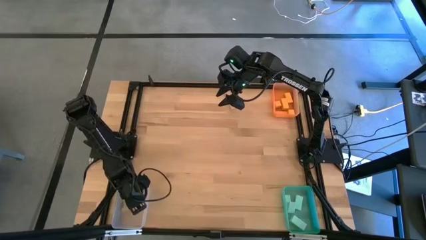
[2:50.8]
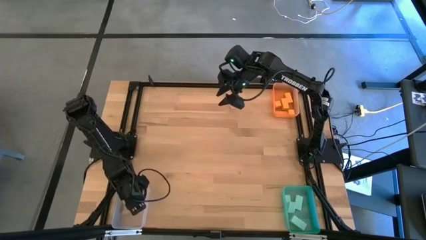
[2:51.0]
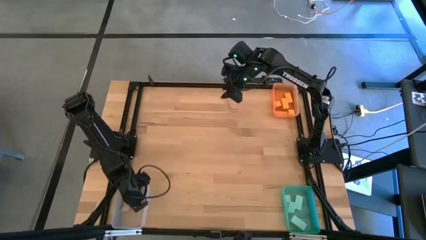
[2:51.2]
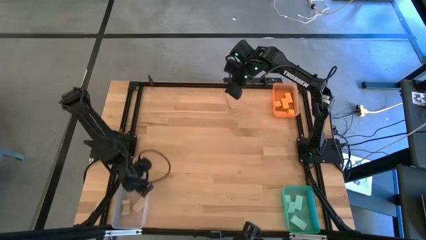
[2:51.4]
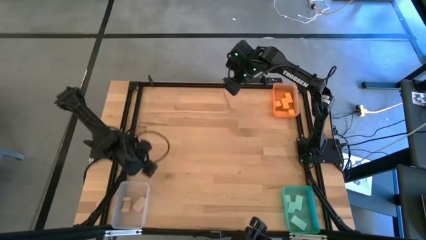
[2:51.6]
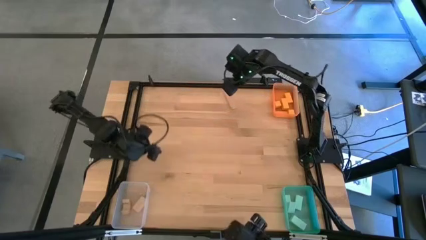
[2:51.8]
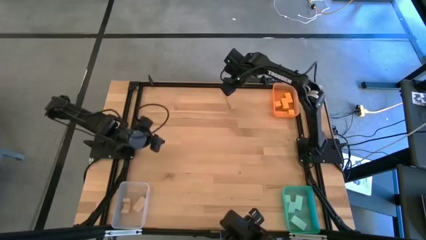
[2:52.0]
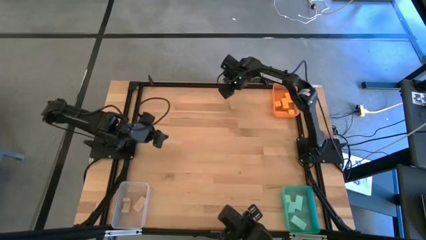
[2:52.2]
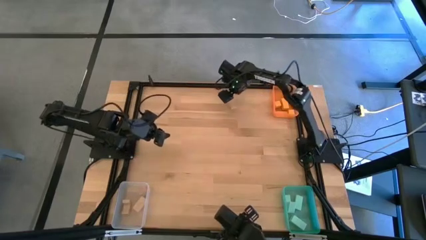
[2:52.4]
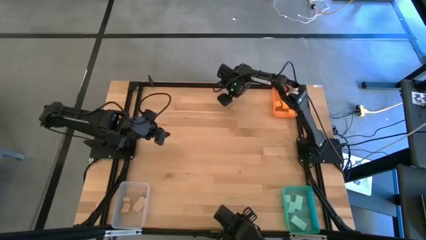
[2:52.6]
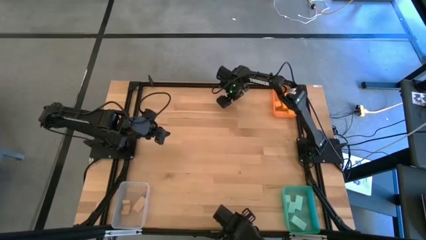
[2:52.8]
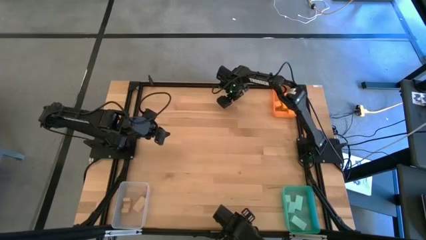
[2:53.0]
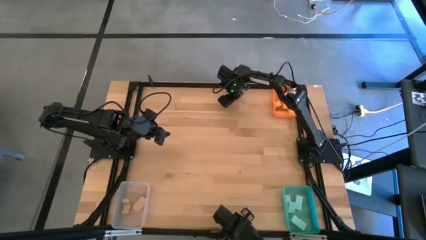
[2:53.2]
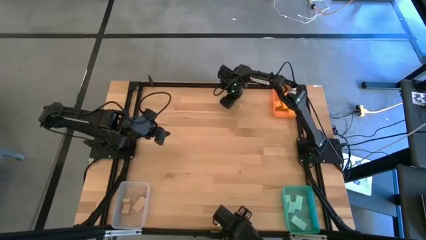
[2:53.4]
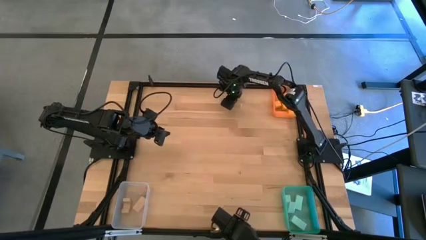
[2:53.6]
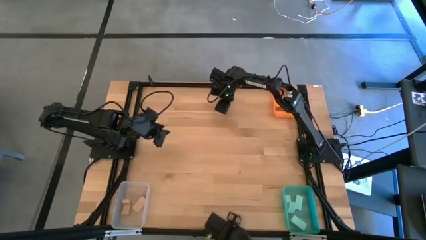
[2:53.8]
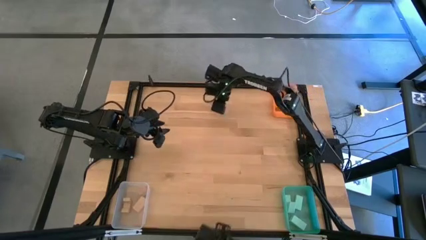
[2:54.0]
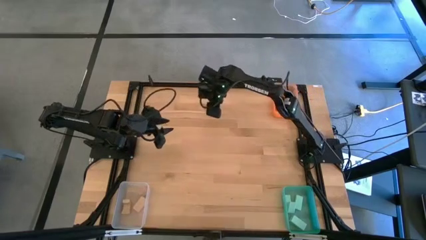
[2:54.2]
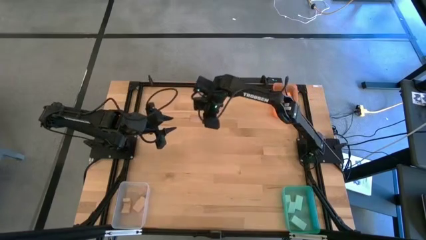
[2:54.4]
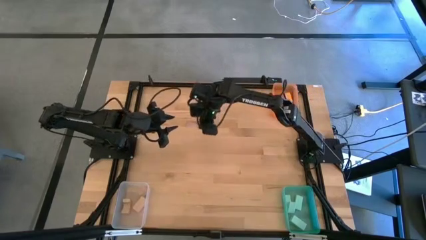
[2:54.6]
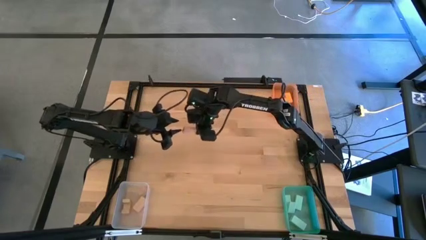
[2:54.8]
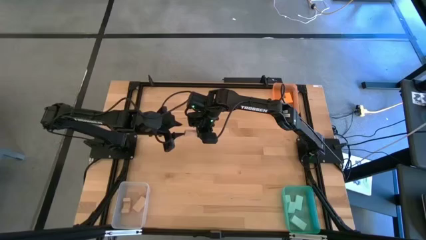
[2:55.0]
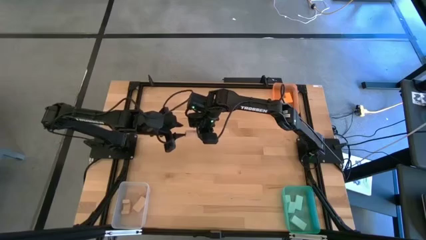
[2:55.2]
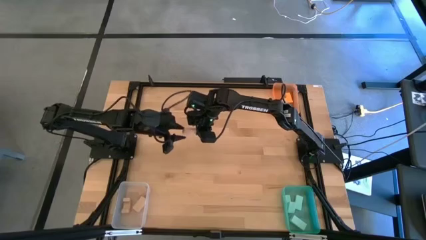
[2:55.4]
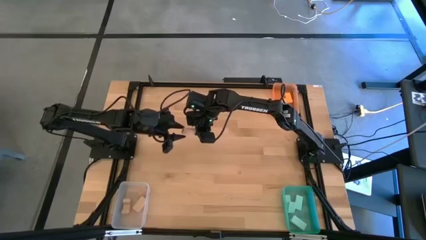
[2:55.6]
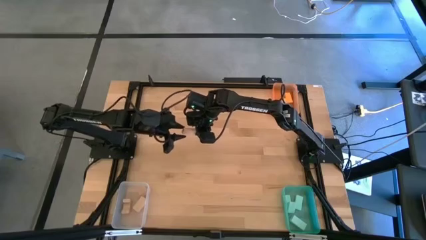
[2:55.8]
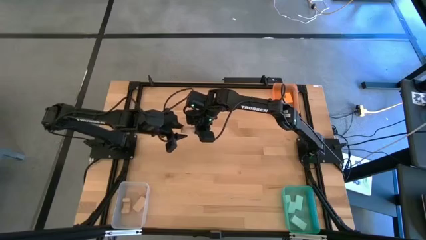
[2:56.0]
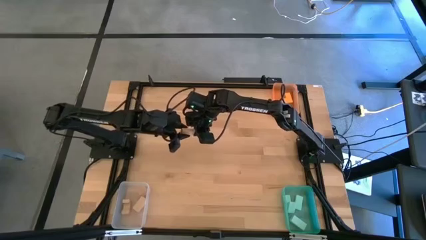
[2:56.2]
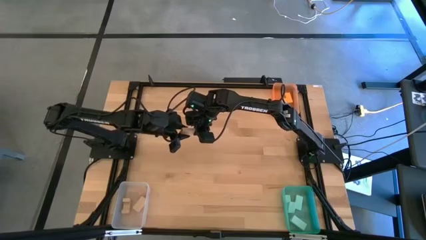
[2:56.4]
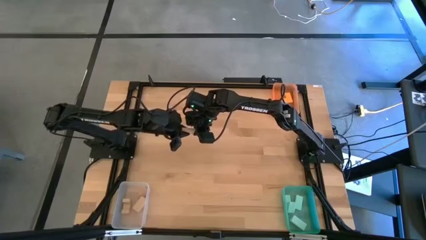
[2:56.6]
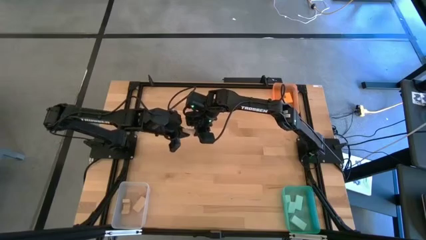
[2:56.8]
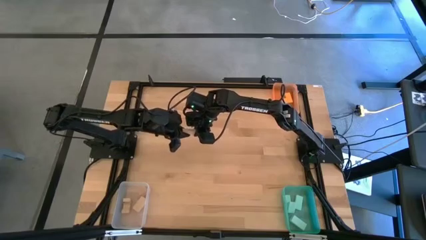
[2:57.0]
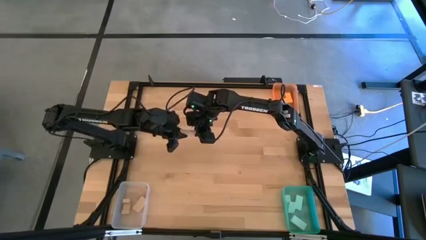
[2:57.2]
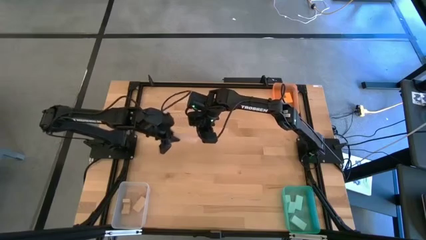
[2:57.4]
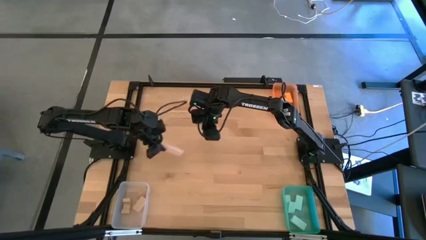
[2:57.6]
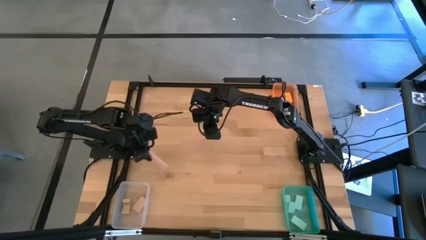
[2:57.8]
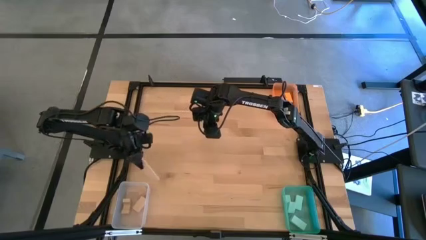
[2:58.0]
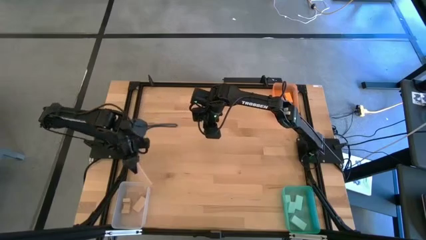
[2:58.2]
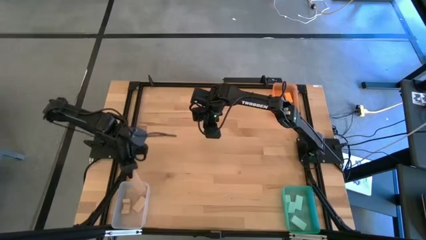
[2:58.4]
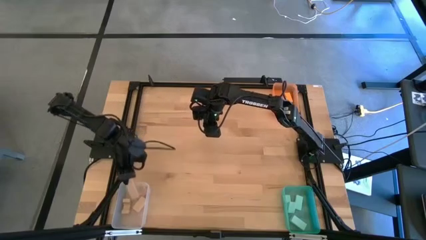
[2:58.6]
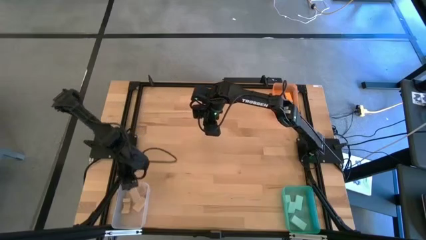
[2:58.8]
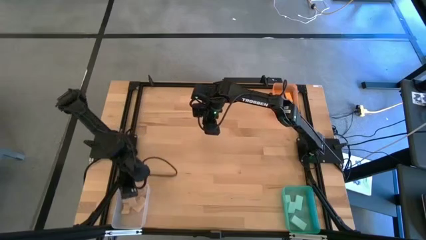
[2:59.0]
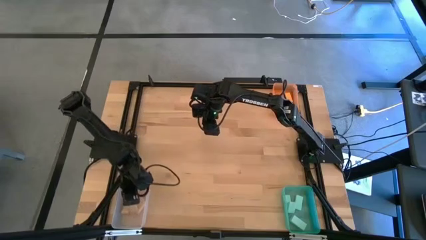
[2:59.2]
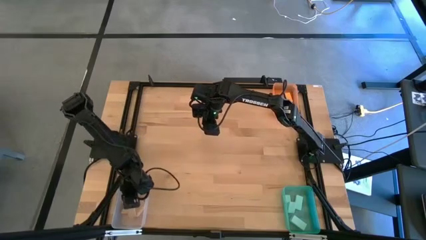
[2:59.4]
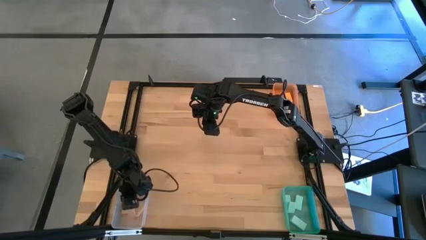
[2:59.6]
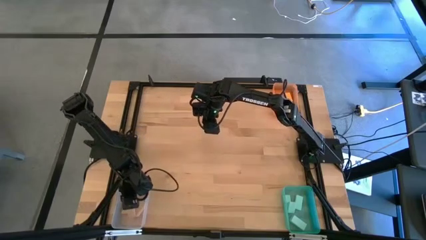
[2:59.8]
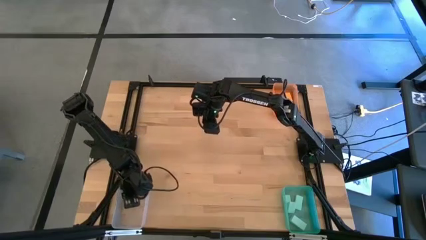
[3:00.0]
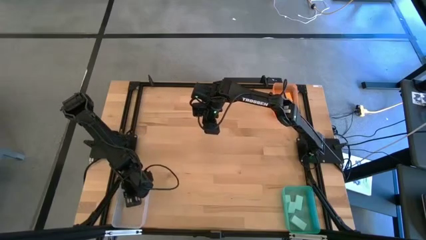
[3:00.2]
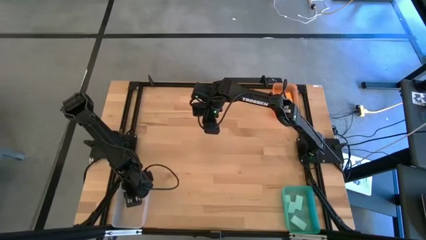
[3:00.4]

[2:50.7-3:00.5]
Task: Sort & place blocks by color
Put the brown block into the transparent bin

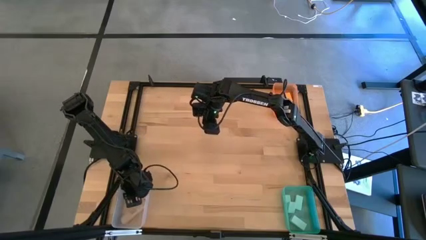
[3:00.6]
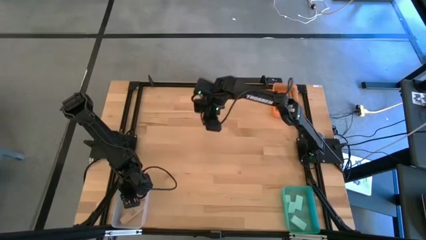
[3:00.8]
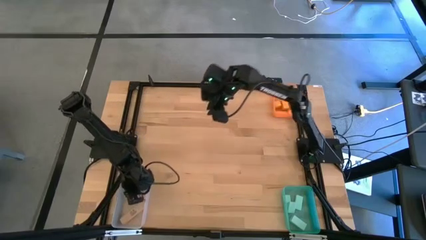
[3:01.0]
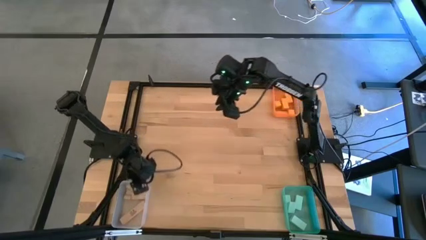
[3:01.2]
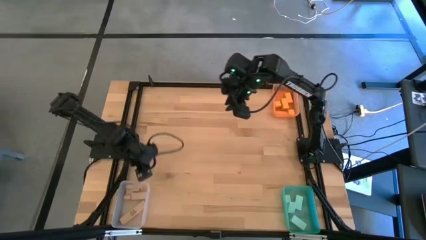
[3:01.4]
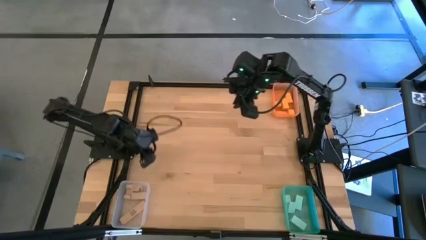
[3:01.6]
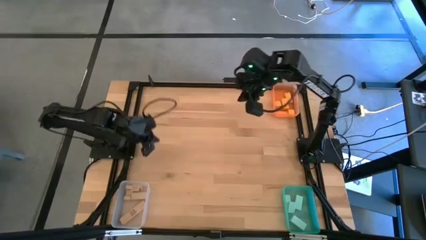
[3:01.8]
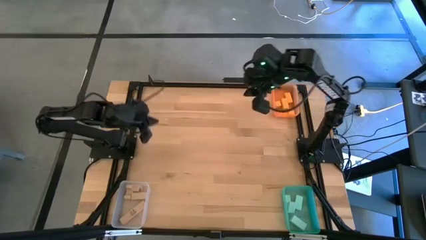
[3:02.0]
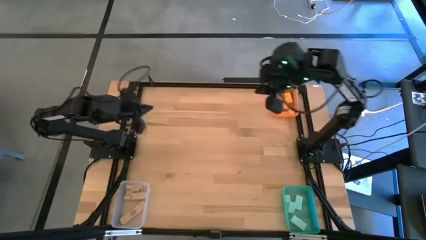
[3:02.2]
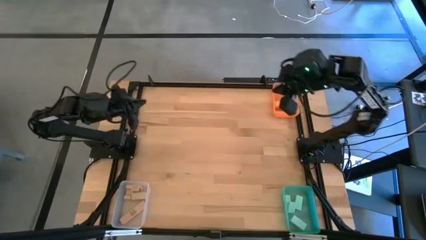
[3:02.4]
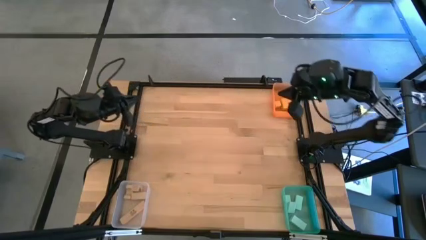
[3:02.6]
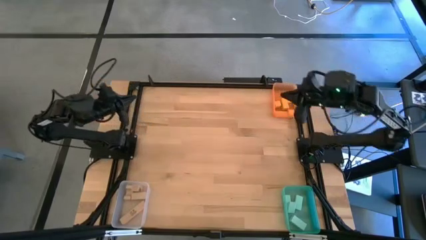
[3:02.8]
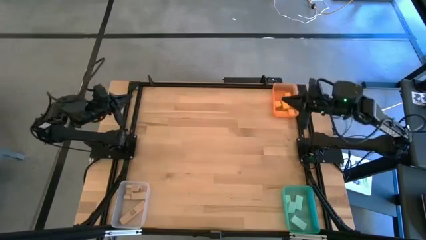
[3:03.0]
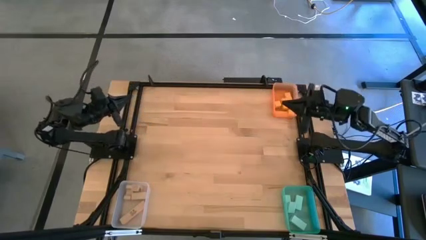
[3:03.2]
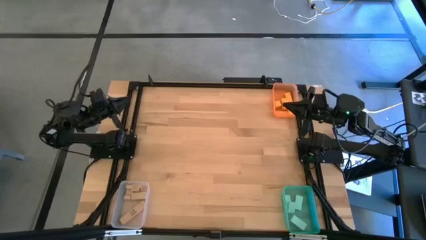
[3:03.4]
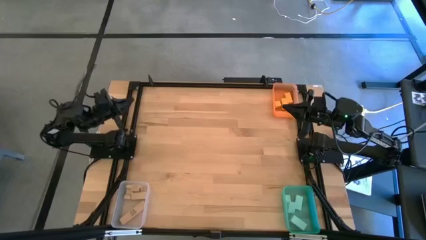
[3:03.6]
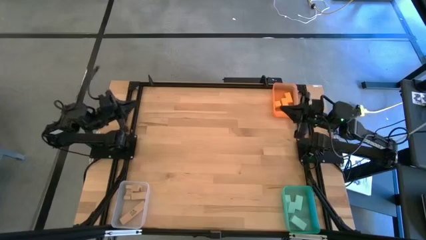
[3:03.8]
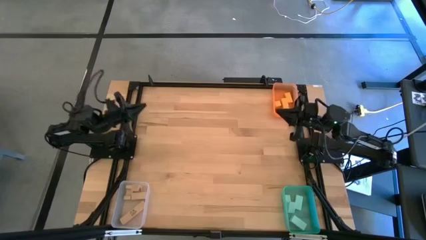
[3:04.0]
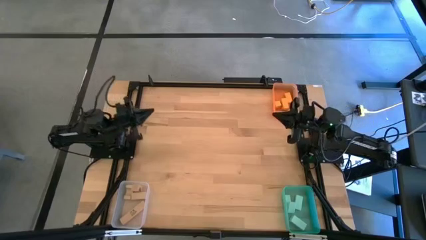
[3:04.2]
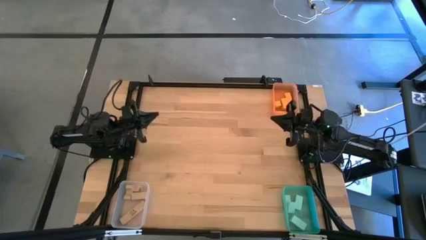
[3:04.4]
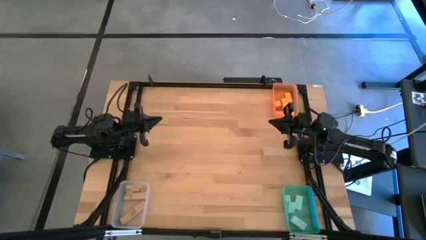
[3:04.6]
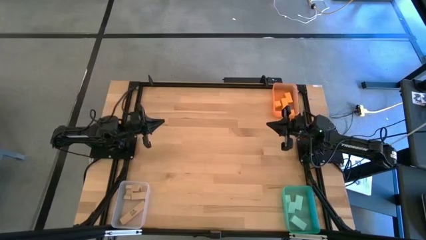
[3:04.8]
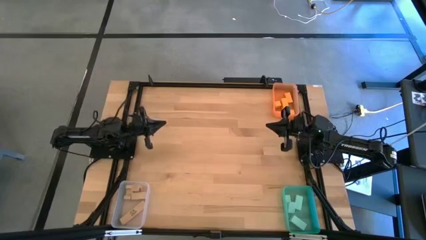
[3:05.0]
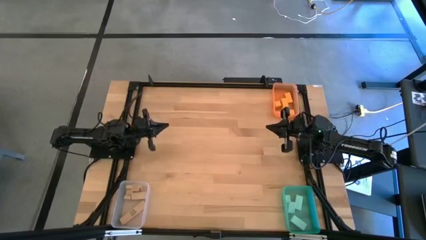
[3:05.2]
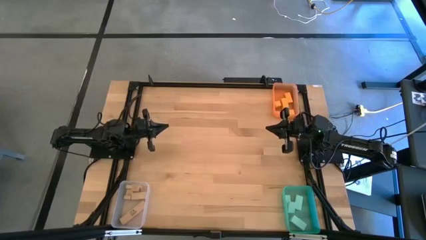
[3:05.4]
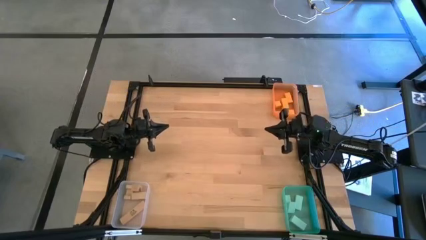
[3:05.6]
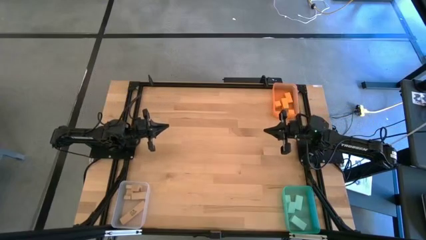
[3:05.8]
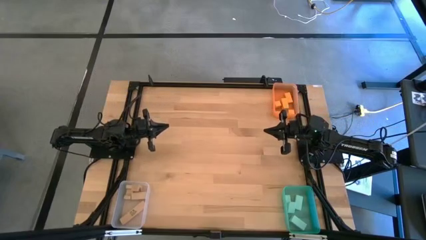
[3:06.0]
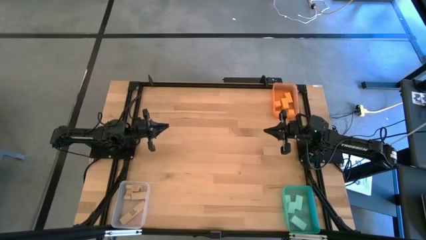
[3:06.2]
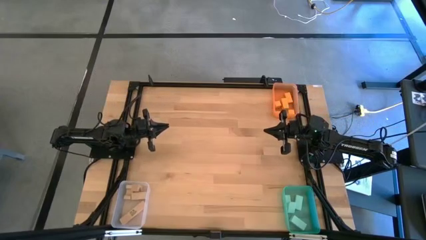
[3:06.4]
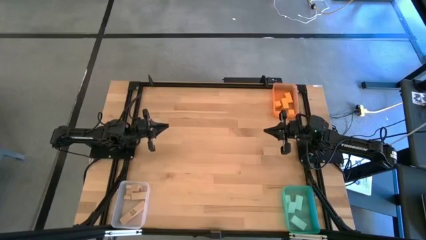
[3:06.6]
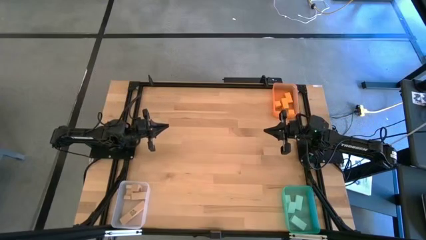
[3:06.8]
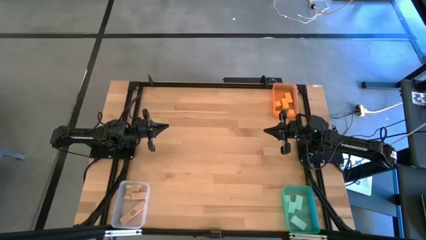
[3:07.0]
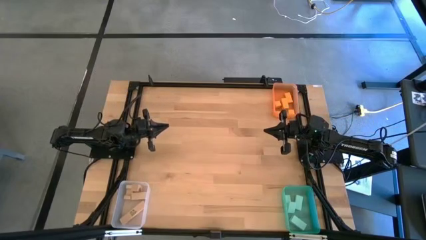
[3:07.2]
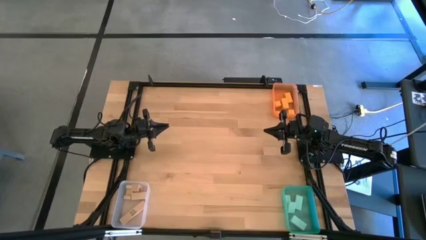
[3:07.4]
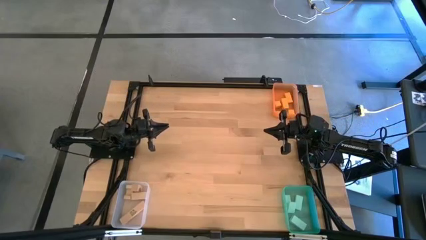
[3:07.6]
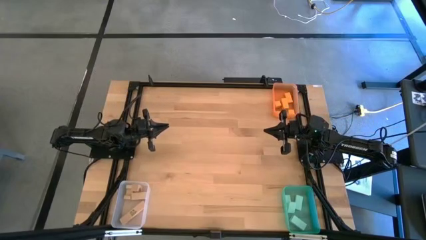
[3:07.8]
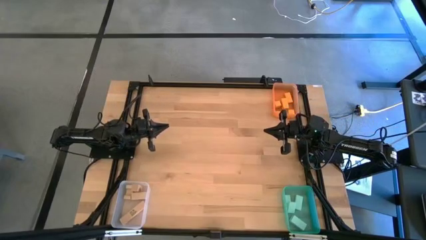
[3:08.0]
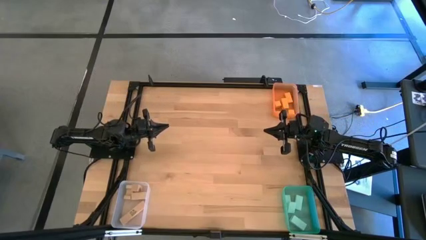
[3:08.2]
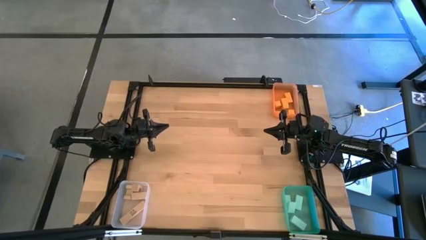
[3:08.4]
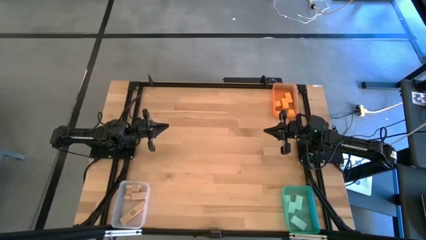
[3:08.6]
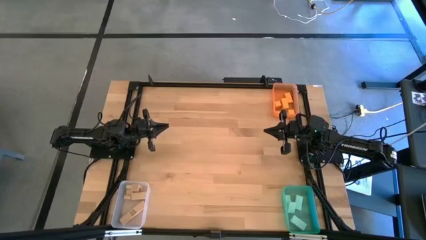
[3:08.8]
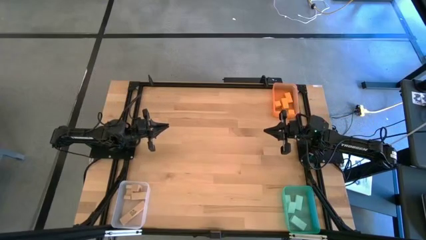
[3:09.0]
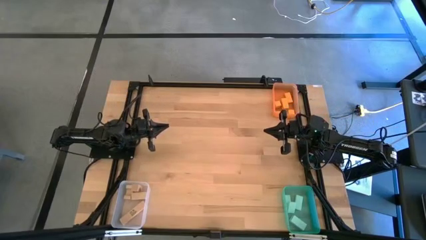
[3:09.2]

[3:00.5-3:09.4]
Return to Home Position
